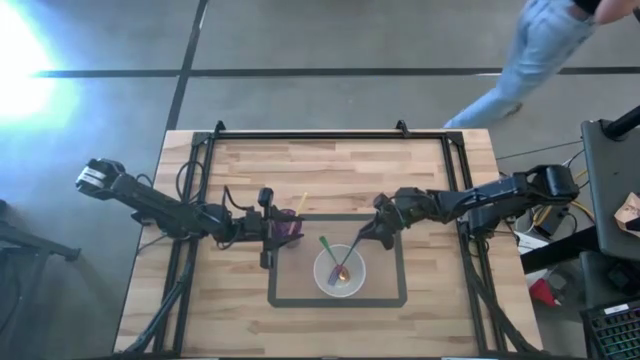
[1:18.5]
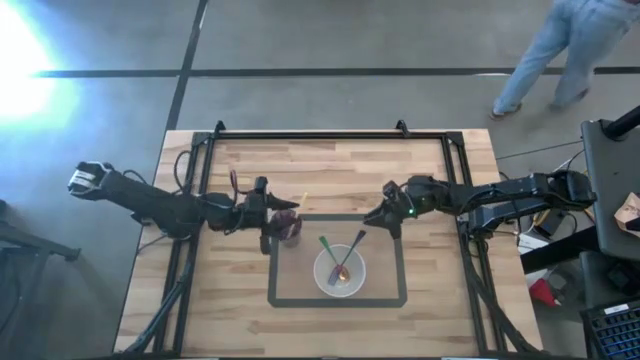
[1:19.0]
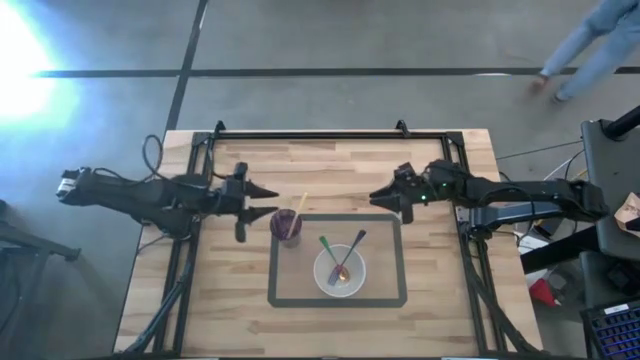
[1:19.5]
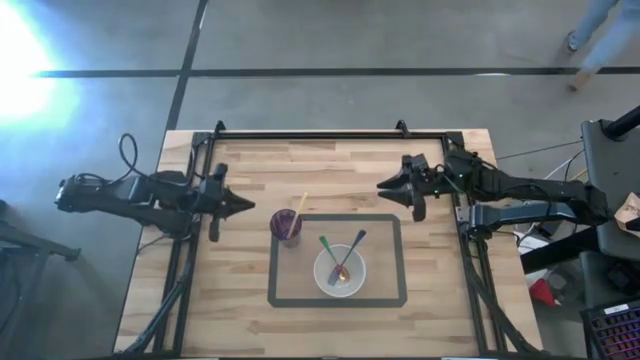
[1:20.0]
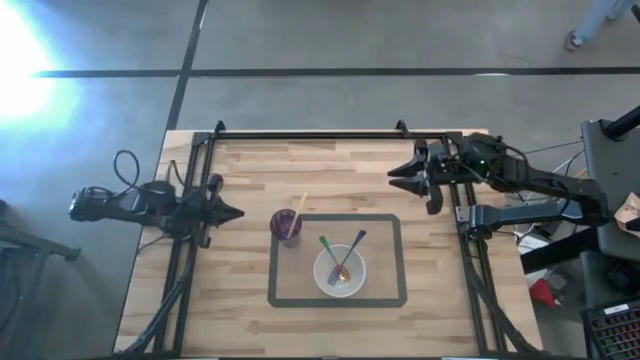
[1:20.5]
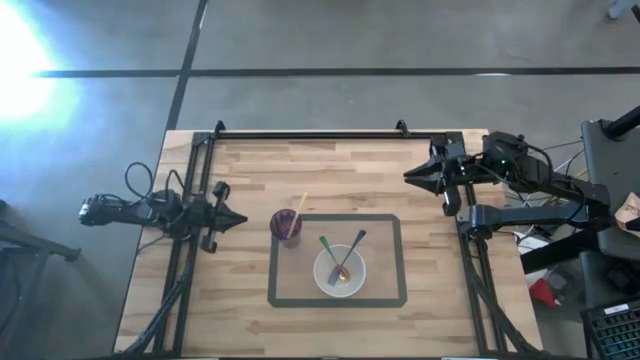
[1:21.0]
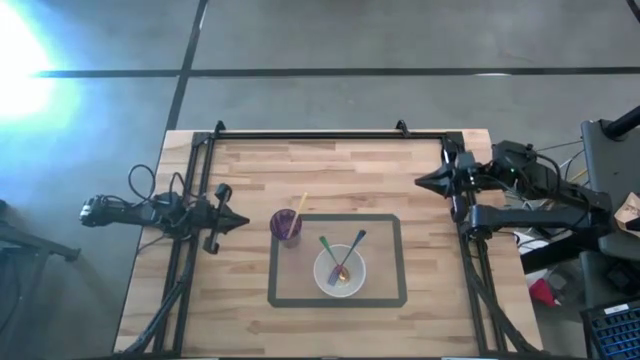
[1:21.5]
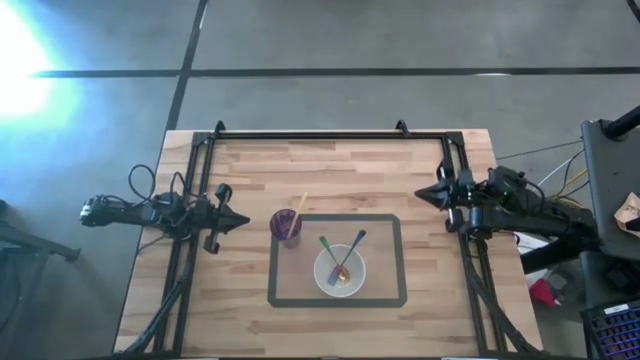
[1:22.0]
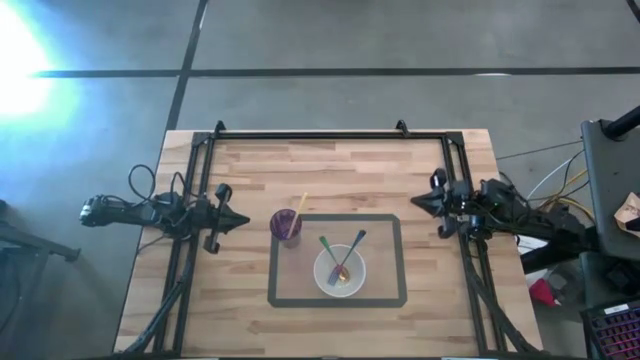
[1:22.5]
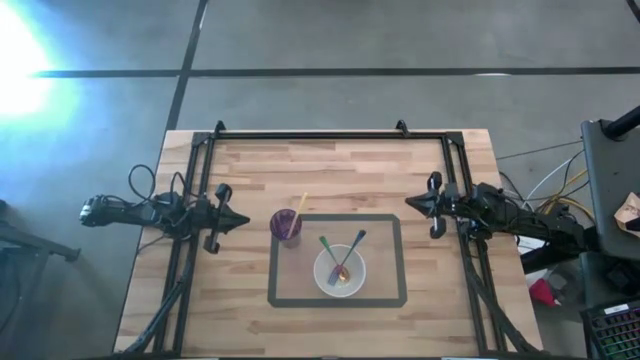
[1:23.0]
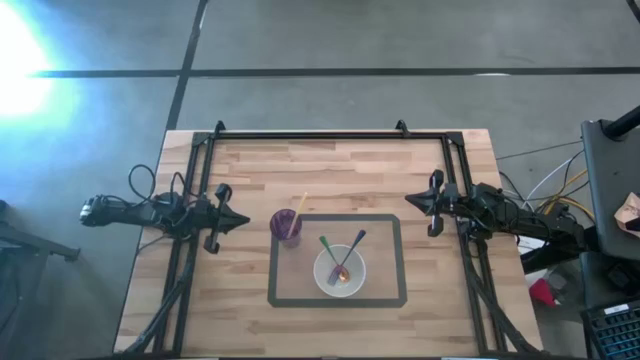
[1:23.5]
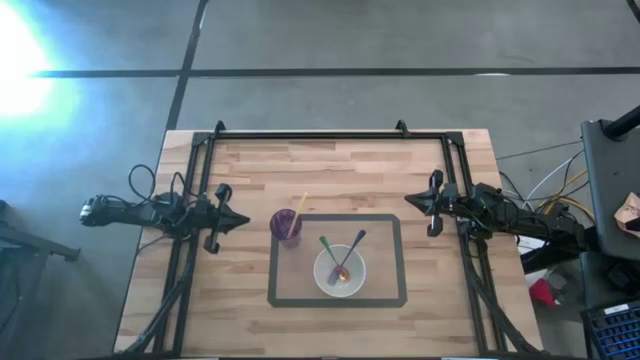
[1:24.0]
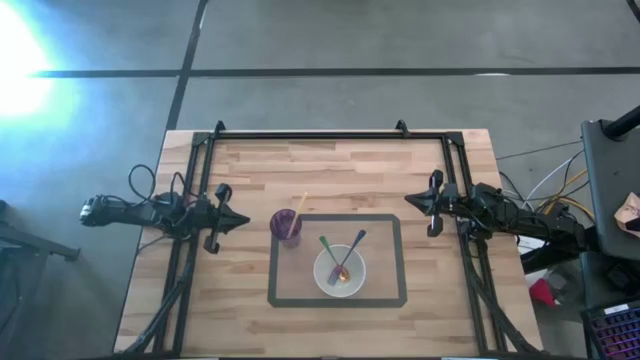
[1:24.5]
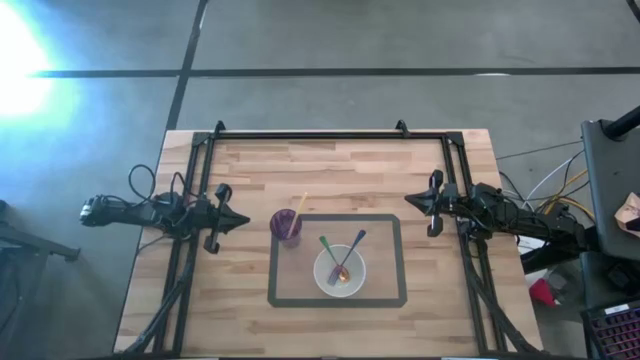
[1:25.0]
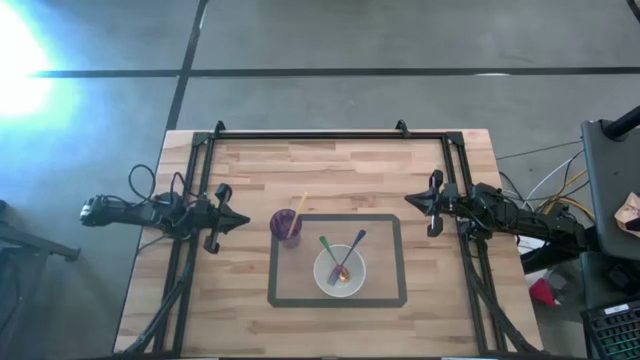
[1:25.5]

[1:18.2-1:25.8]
Task: Pick & Place Utensil
Return to Home Position

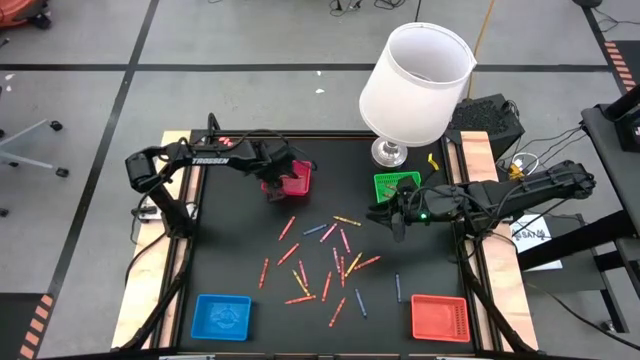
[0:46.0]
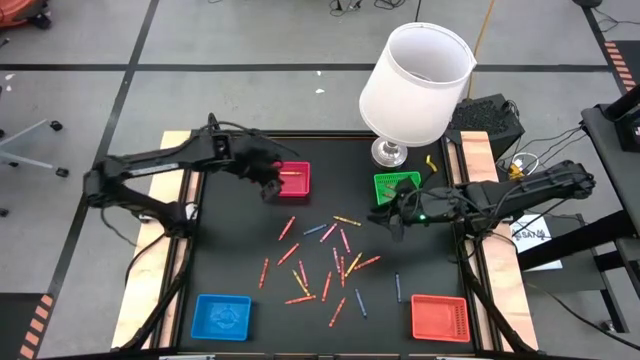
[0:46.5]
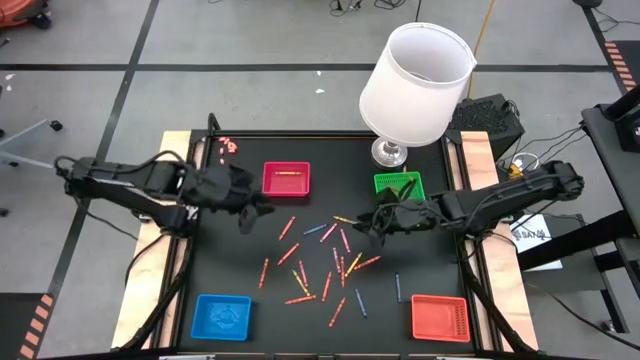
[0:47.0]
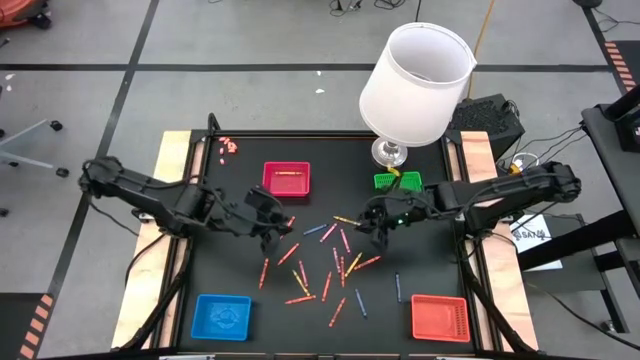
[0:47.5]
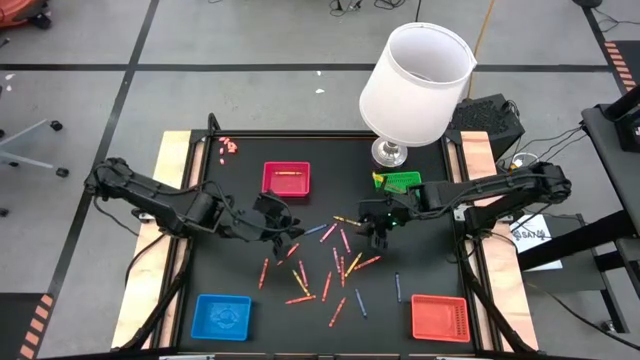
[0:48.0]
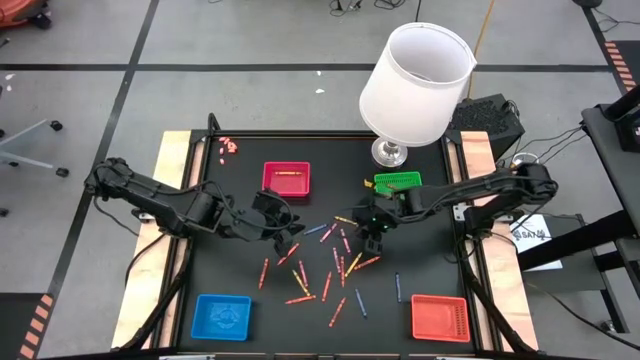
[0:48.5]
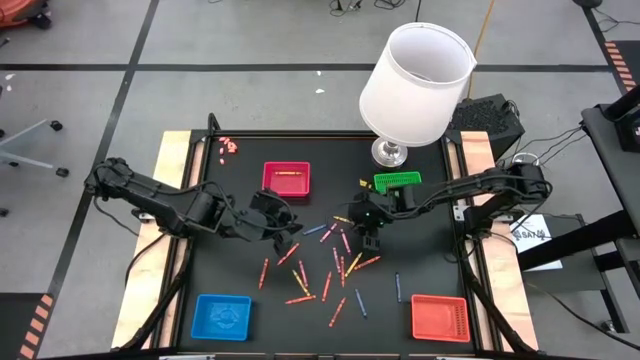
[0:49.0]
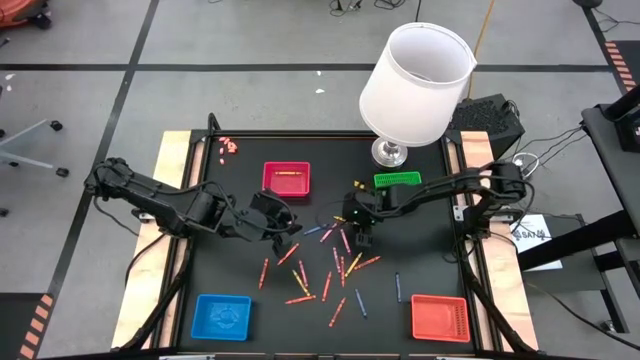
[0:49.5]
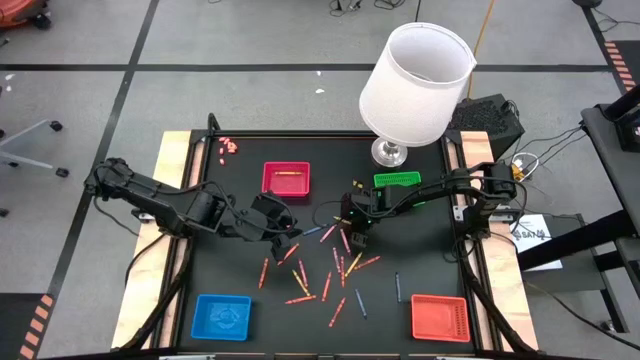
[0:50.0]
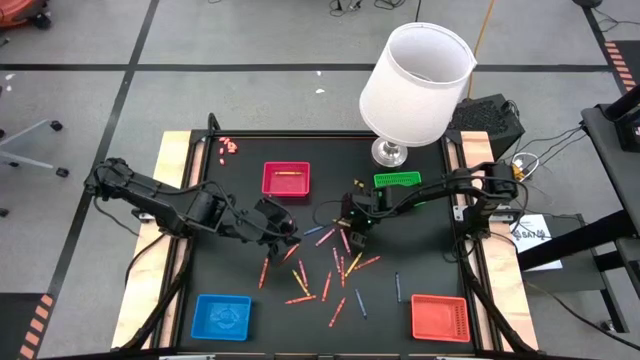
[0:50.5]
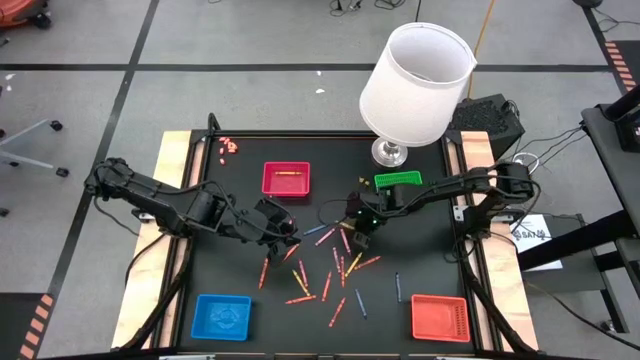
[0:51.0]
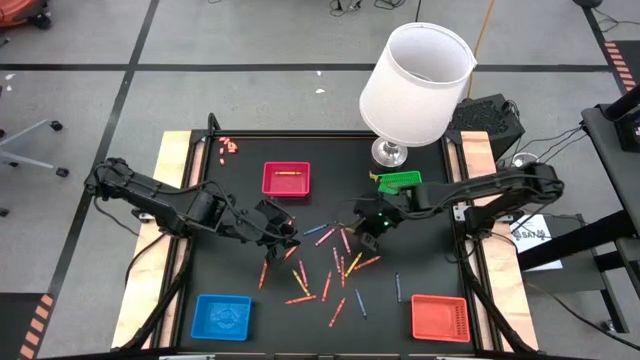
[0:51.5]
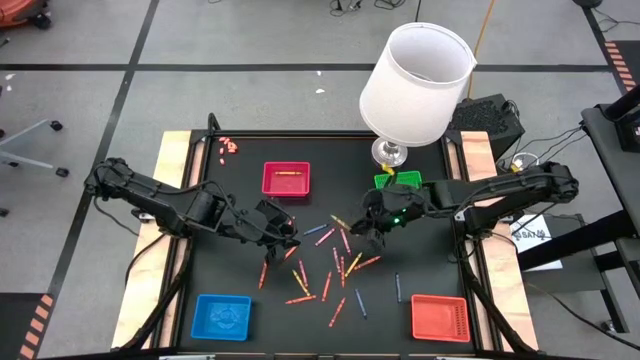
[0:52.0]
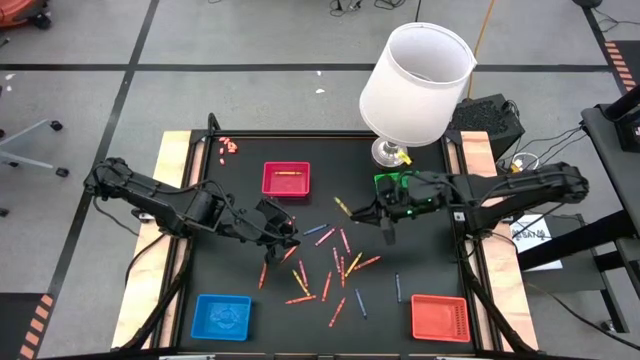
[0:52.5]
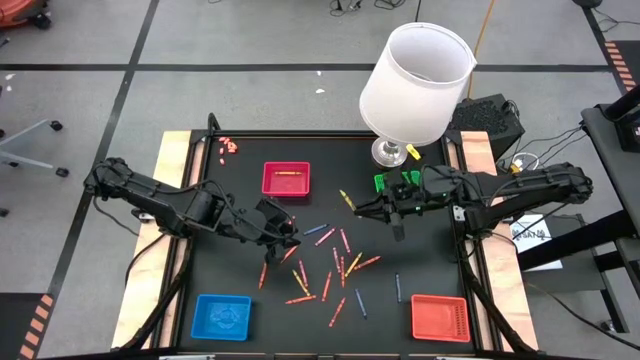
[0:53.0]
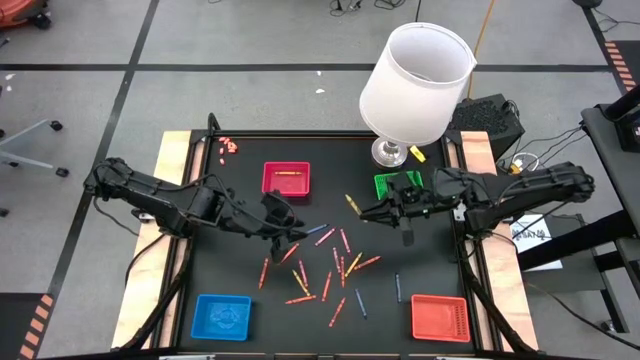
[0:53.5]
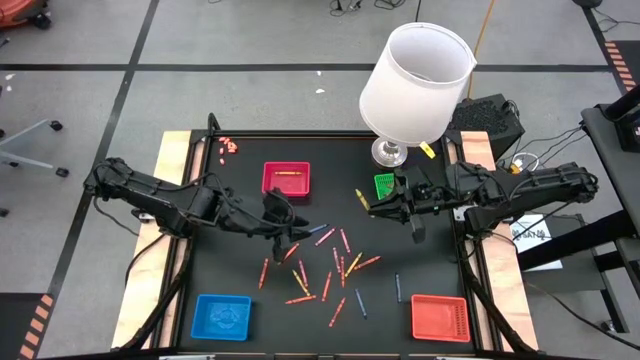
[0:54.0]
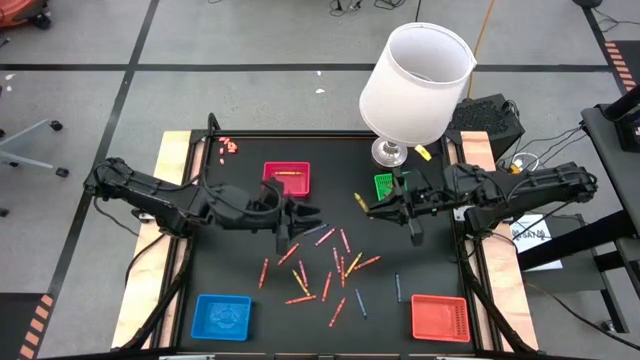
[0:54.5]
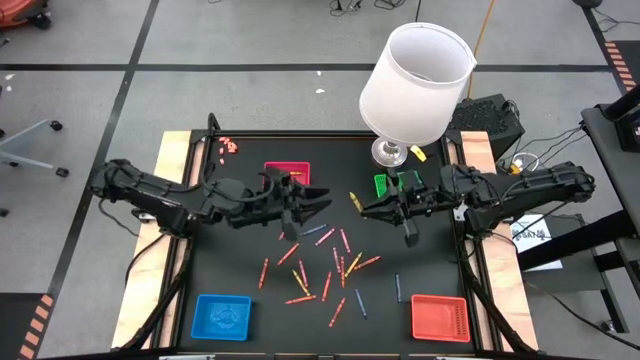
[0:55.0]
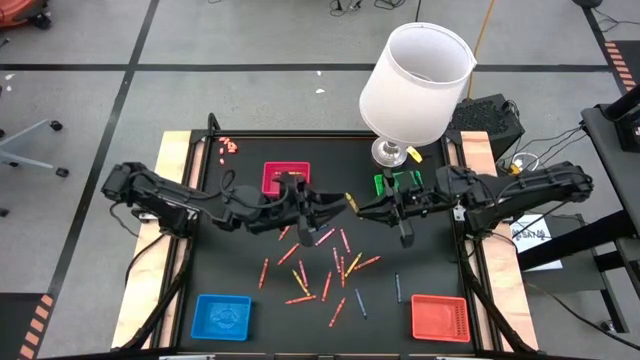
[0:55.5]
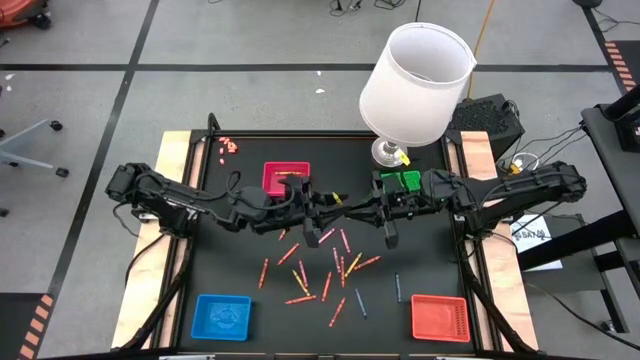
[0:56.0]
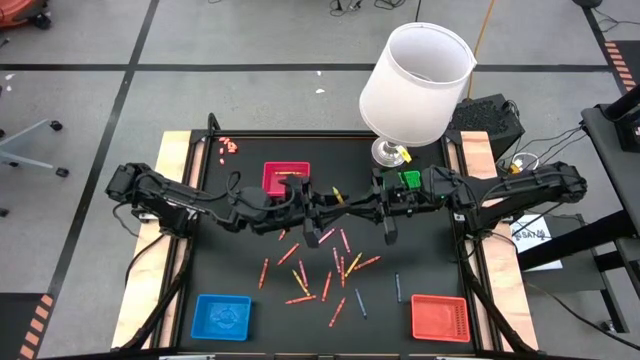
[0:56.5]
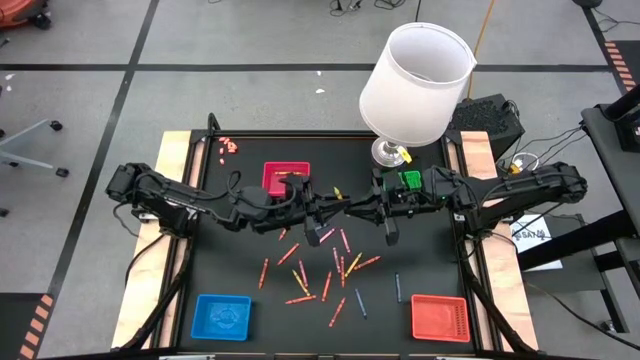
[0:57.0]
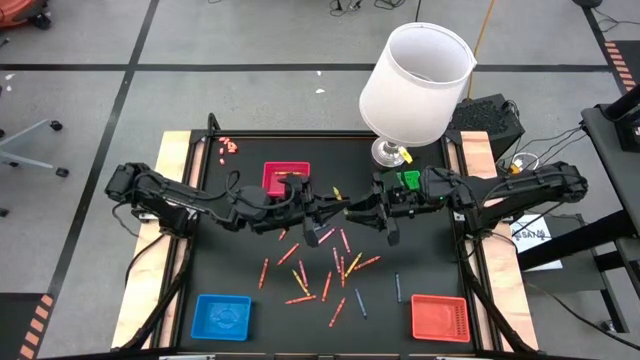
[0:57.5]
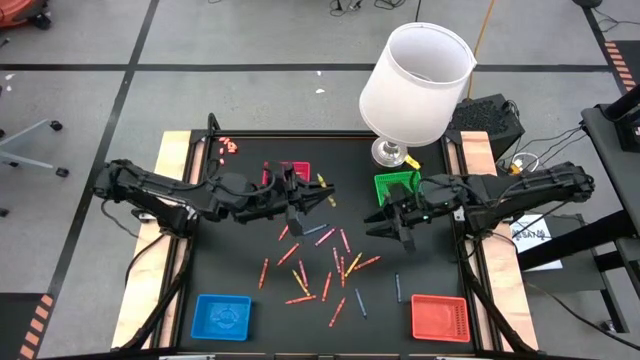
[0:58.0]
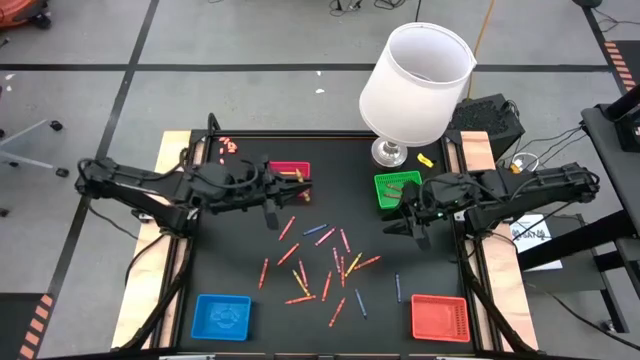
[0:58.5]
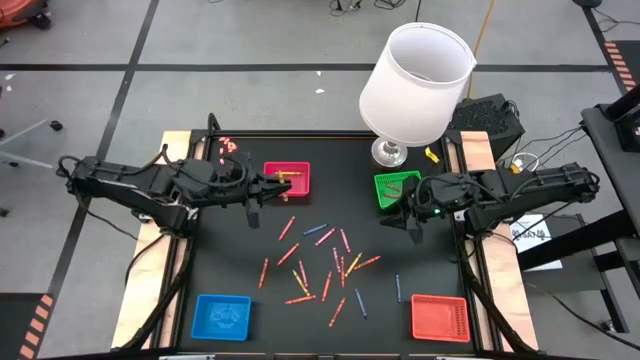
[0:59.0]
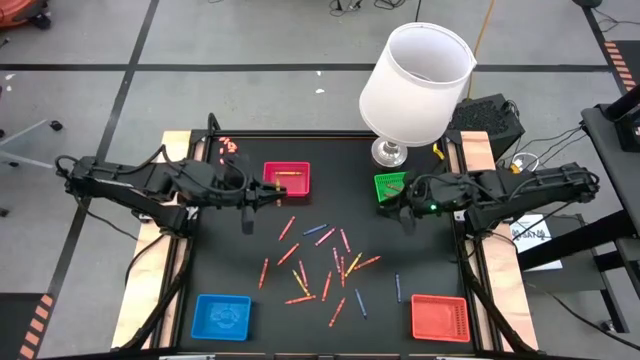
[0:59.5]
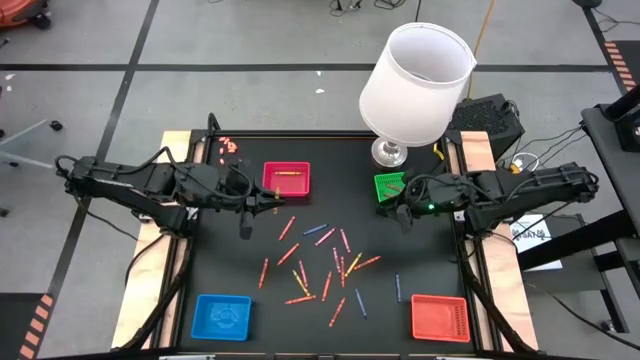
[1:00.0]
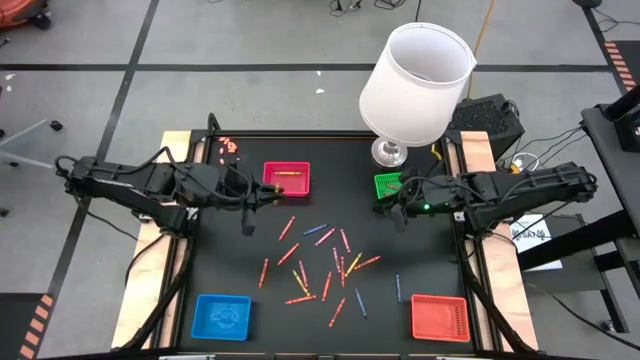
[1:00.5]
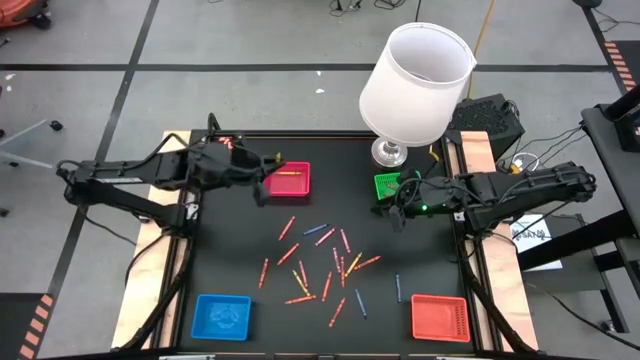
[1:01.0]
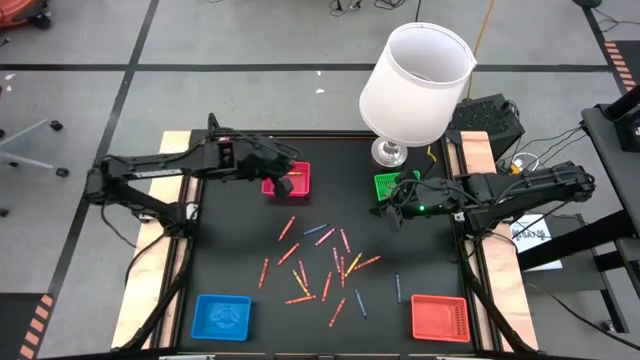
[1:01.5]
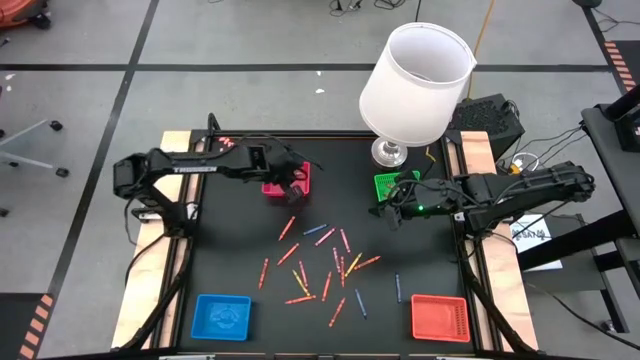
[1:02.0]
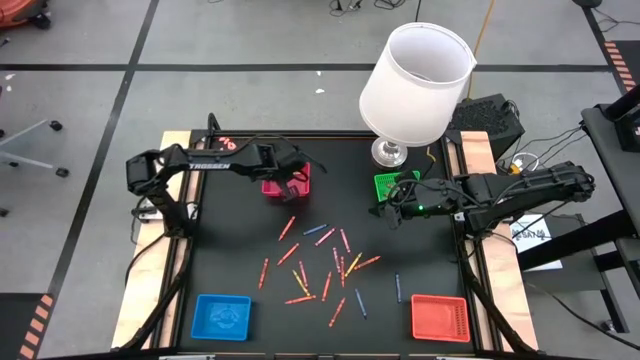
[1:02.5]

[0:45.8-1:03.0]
Task: Sort crayons
Put the yellow crayon into the red basket
